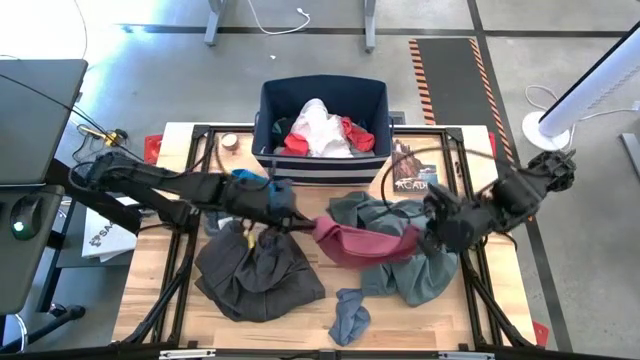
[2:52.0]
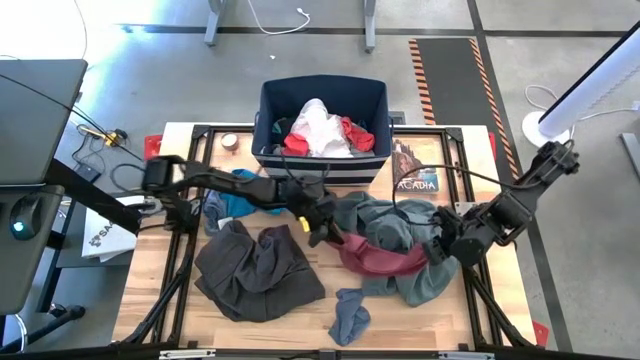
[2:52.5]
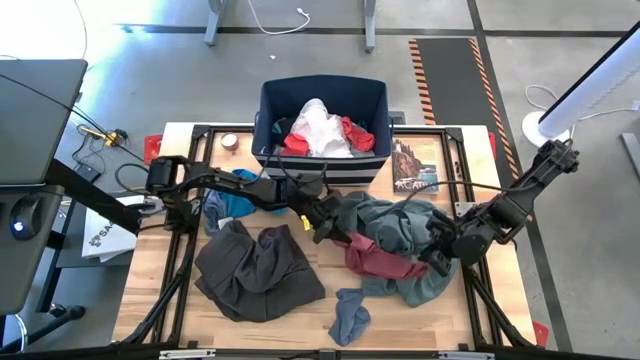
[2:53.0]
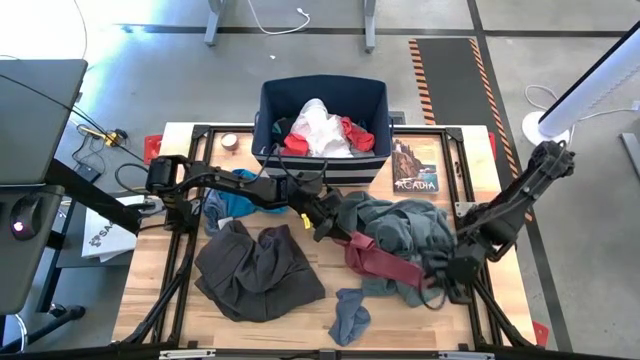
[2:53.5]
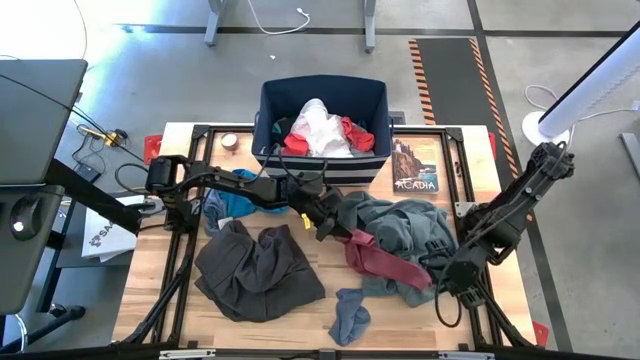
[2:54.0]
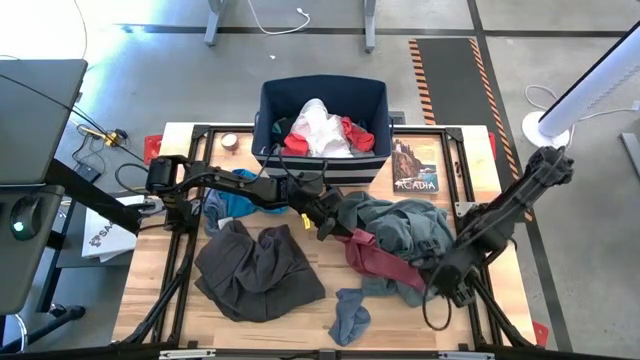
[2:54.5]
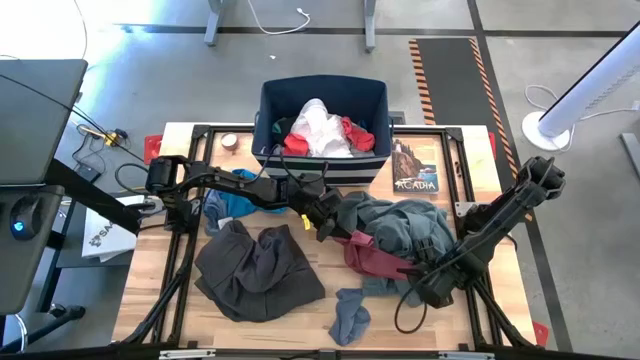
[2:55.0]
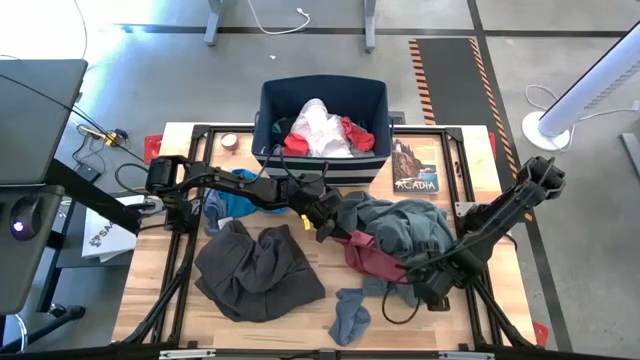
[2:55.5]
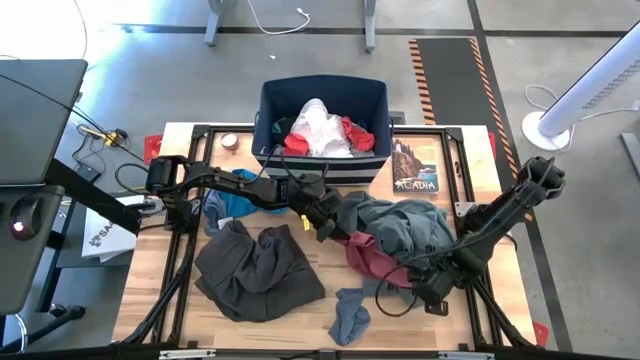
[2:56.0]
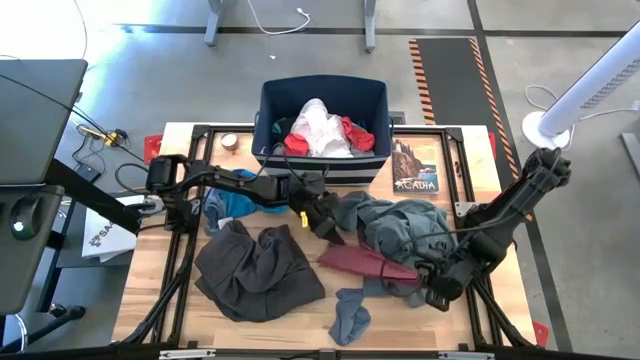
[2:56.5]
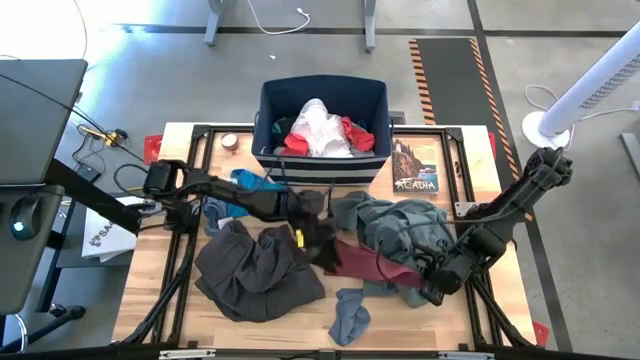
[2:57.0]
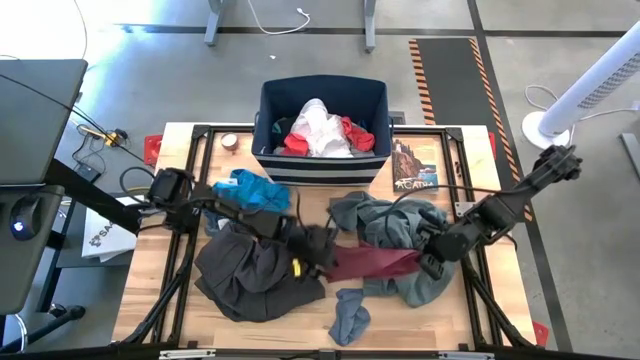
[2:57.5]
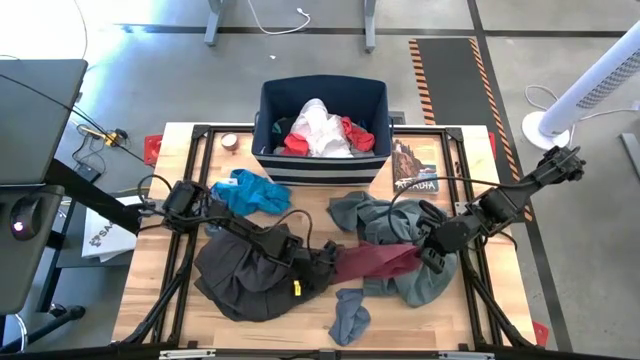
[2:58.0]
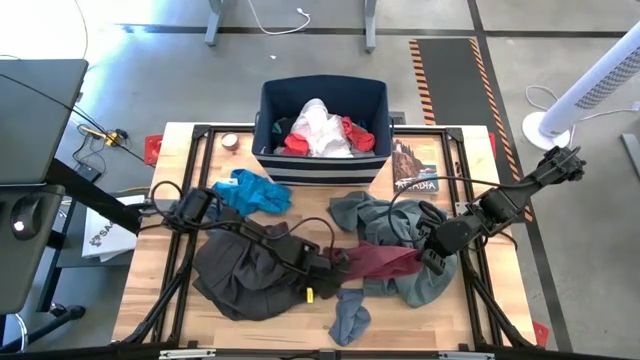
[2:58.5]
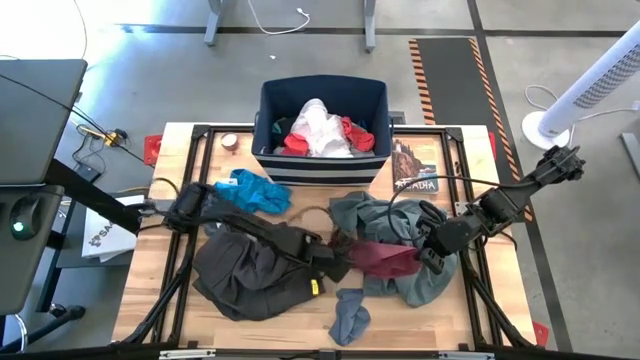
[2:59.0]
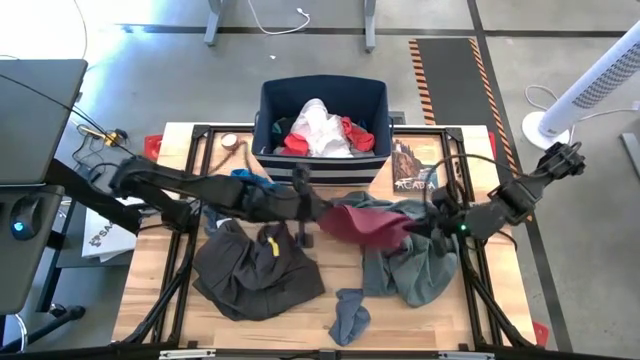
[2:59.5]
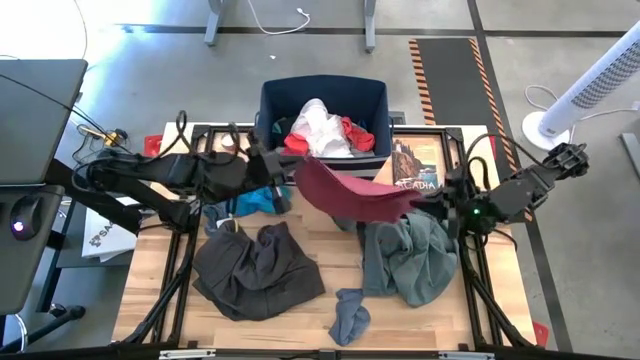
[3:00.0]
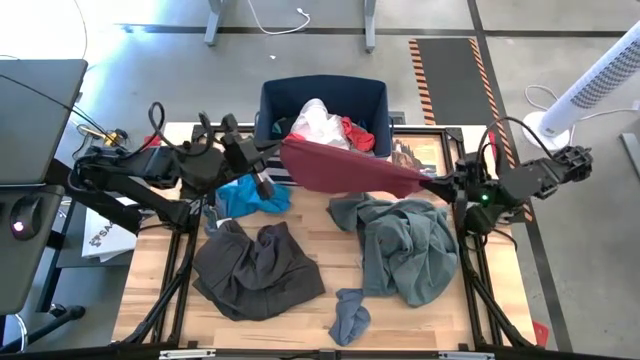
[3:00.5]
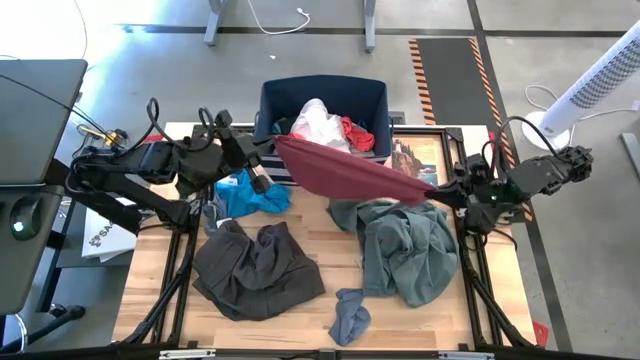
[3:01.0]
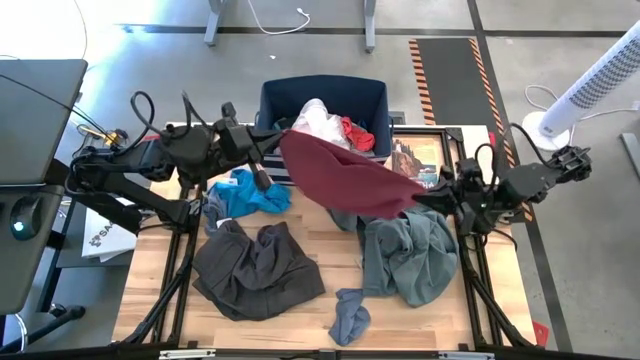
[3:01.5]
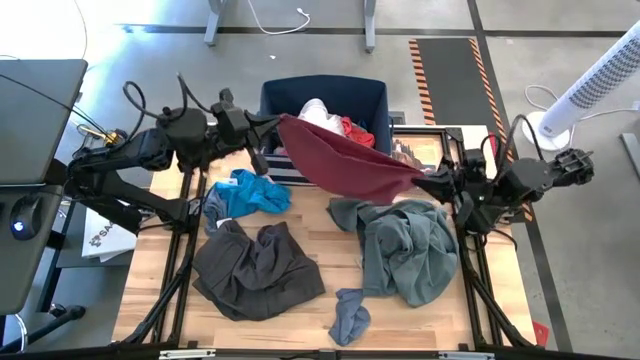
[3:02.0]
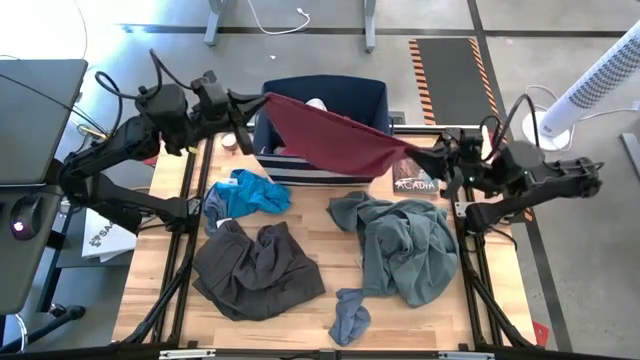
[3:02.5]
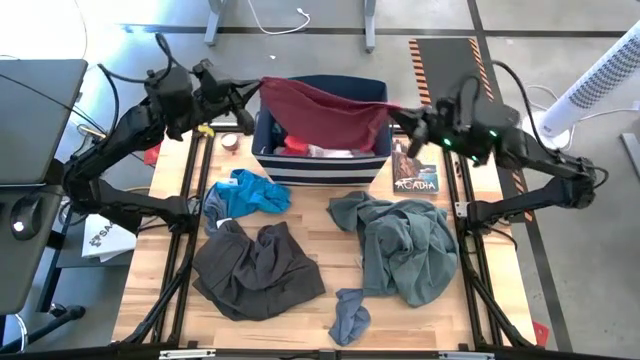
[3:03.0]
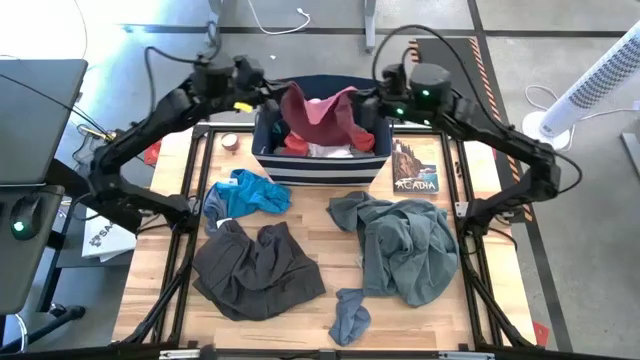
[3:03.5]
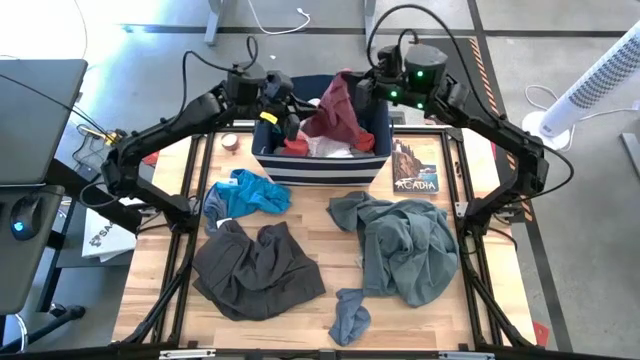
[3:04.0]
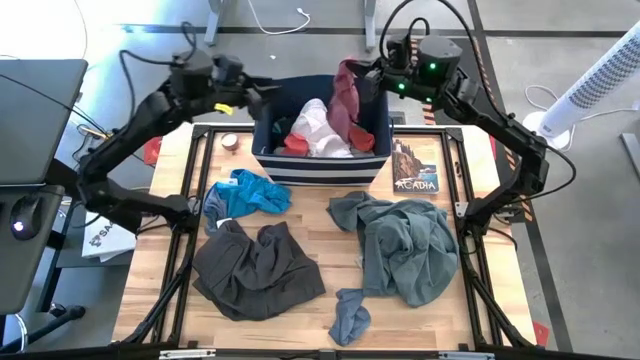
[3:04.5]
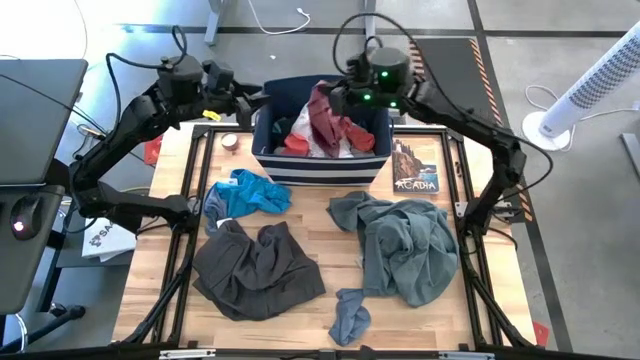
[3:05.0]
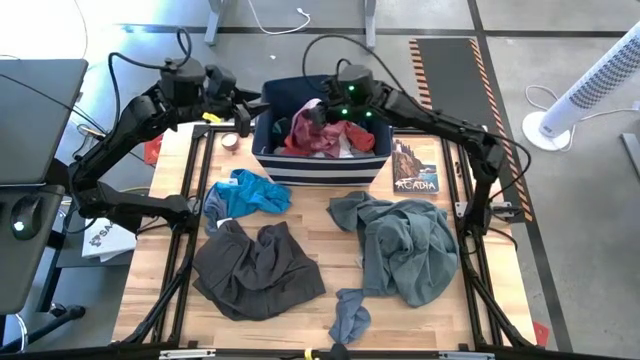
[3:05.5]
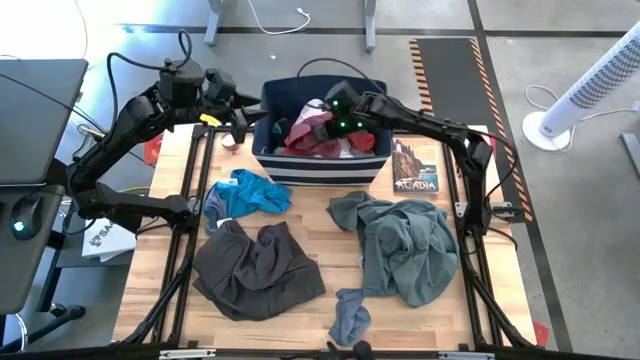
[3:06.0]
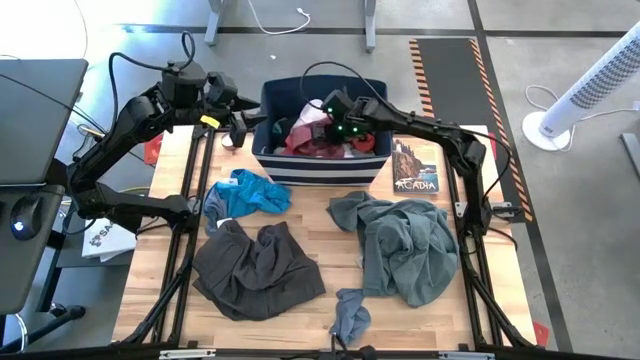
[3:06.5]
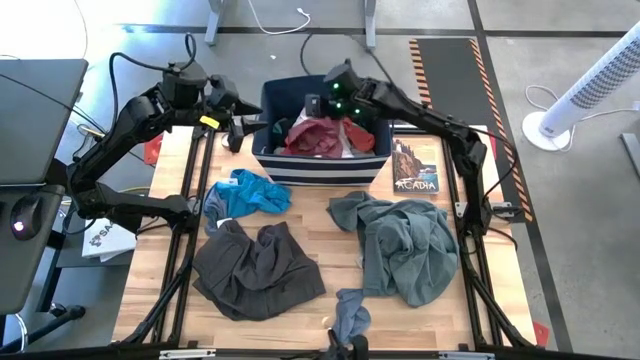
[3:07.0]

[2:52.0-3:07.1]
Task: Sort clothes
Put the pink skirt into the blue laundry bin

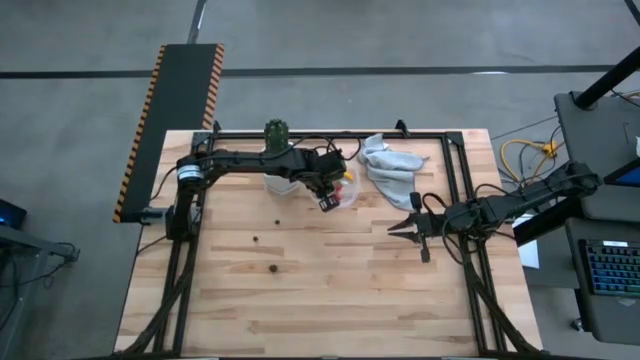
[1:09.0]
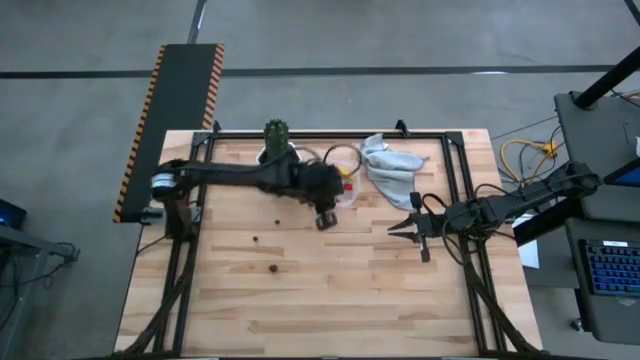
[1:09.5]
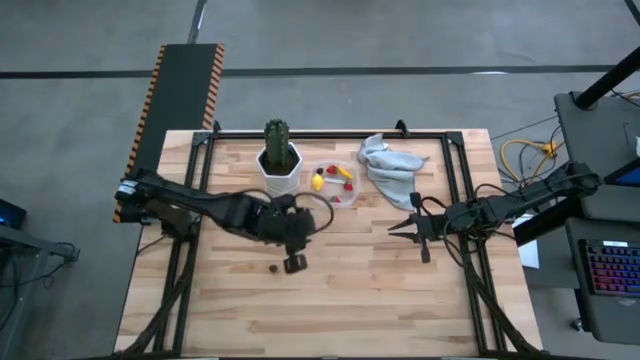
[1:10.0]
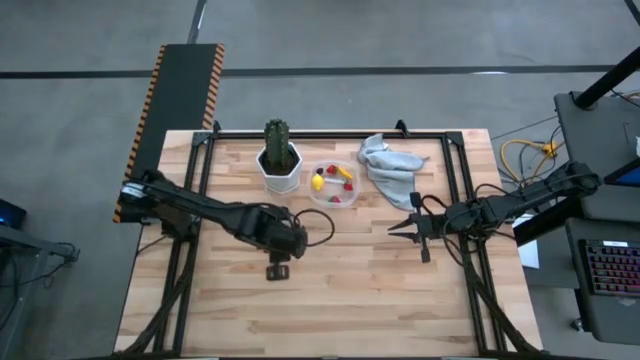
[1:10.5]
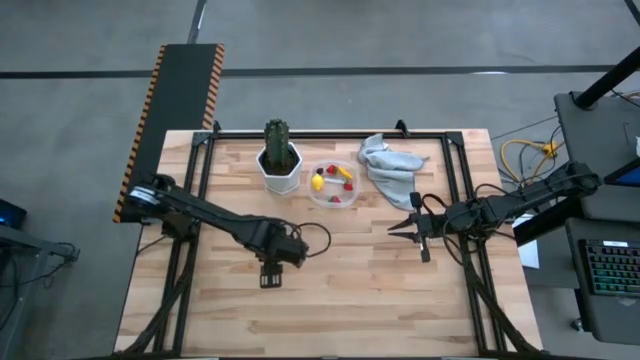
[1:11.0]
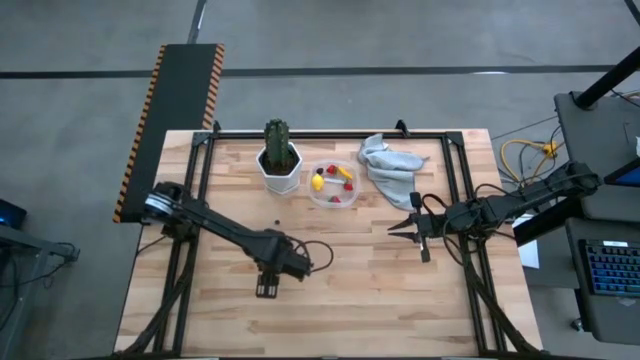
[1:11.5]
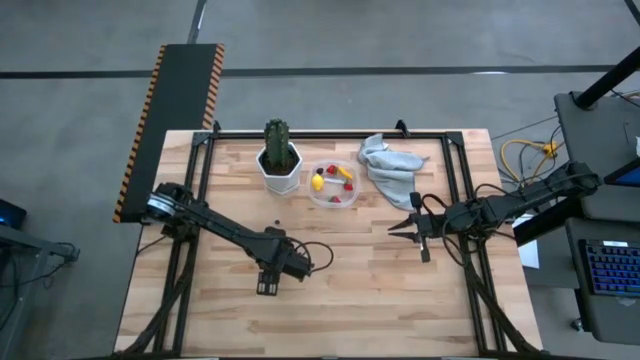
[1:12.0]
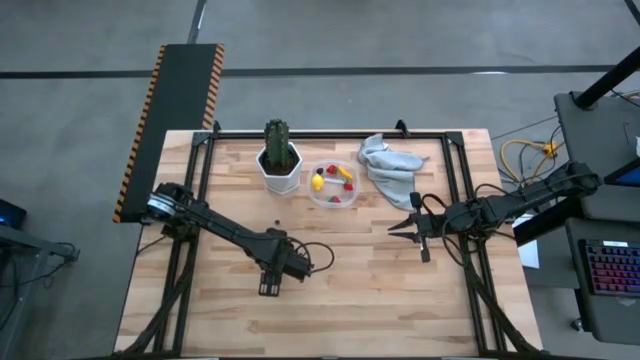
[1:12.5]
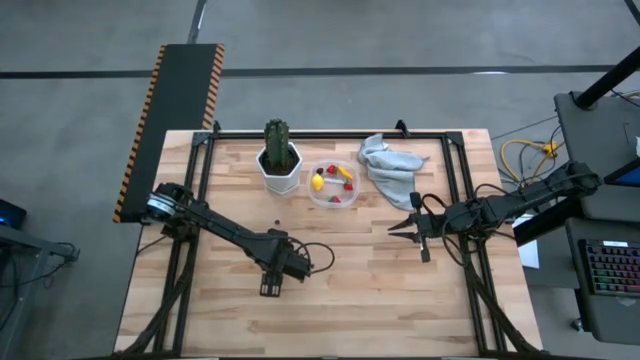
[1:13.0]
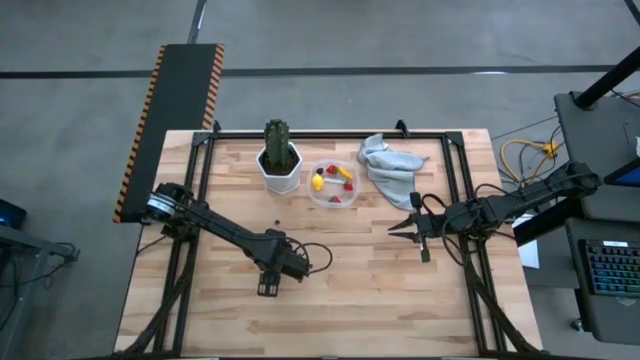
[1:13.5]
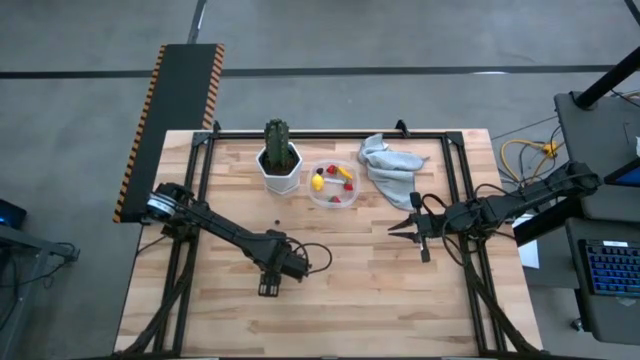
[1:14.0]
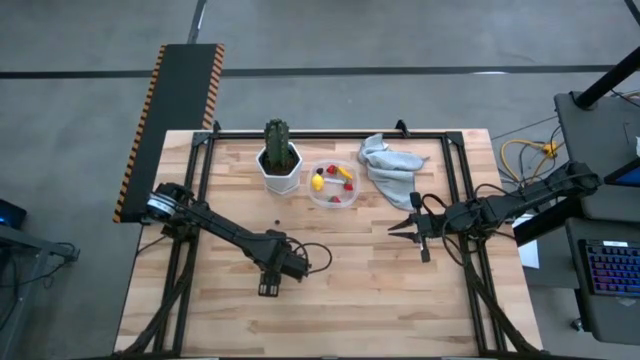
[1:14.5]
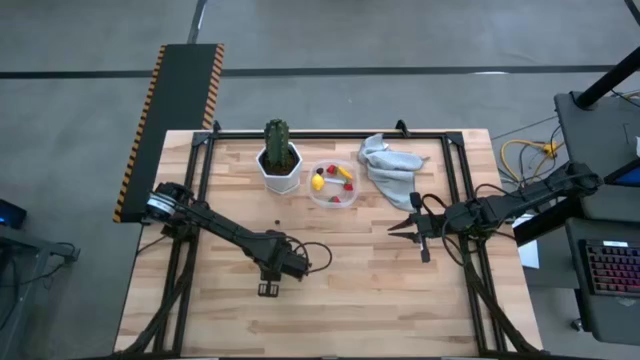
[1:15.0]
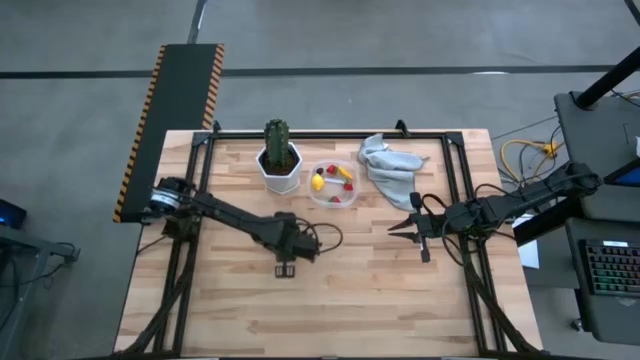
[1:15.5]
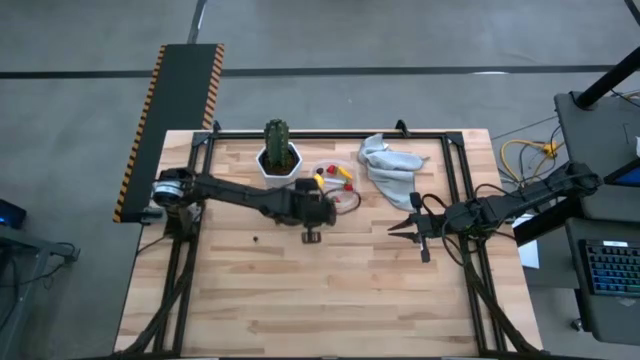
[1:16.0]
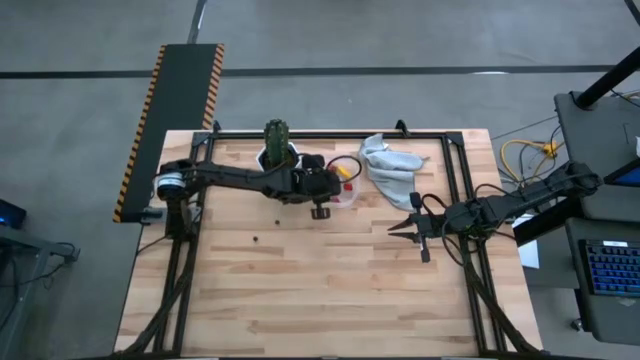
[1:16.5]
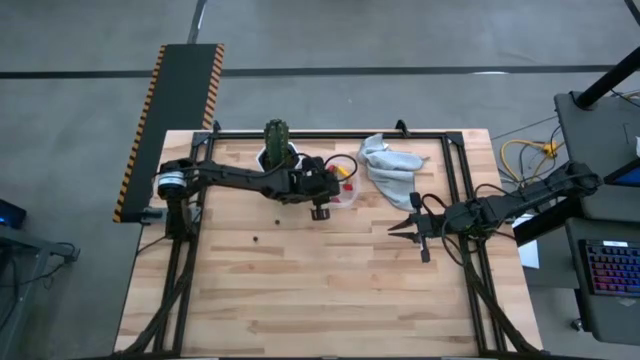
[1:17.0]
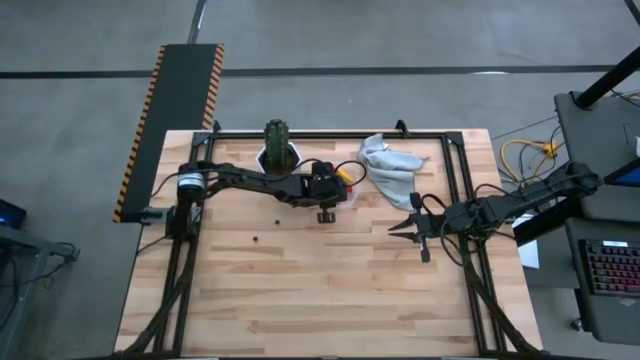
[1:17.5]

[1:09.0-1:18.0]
Task: Pick and placing Produce into tupperware
Put the black cherry into the transparent bin
